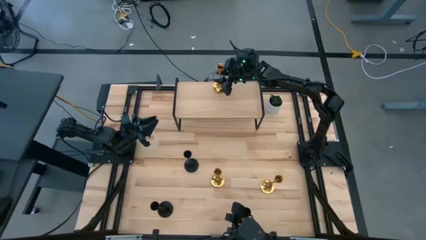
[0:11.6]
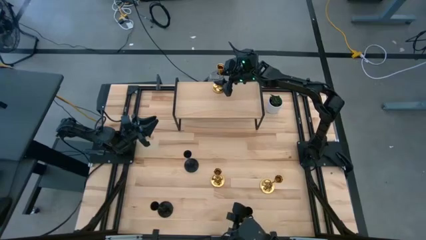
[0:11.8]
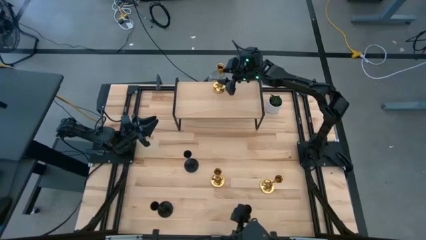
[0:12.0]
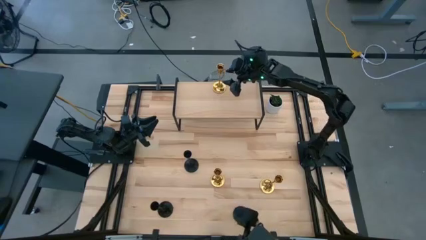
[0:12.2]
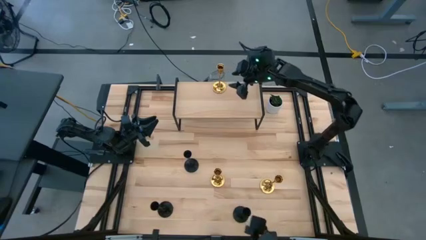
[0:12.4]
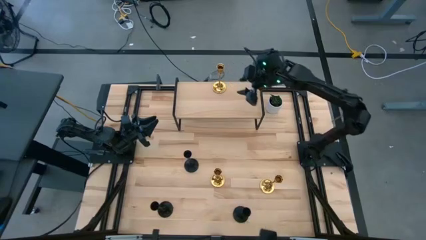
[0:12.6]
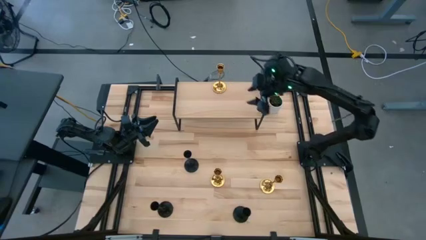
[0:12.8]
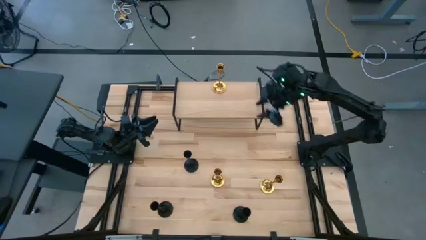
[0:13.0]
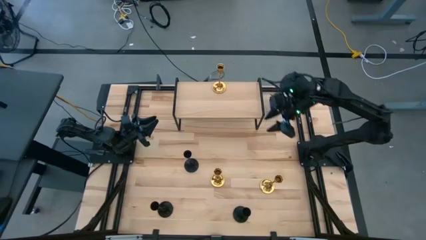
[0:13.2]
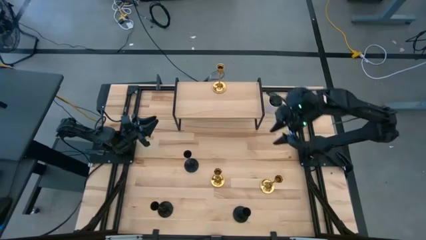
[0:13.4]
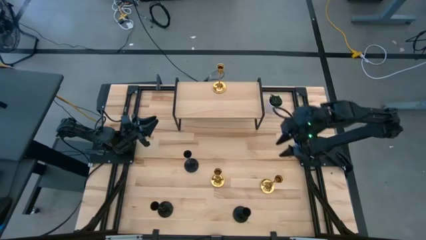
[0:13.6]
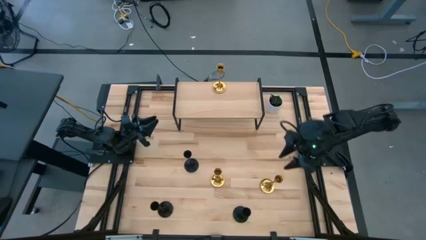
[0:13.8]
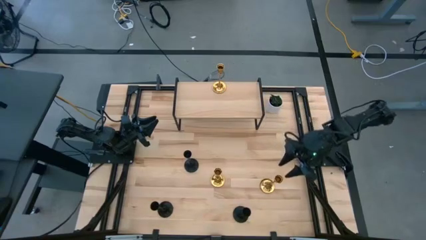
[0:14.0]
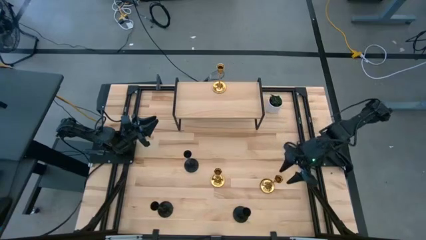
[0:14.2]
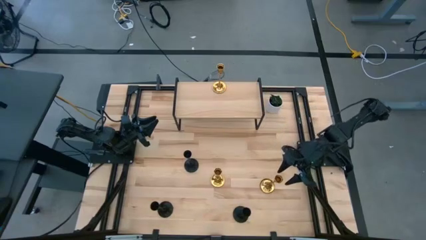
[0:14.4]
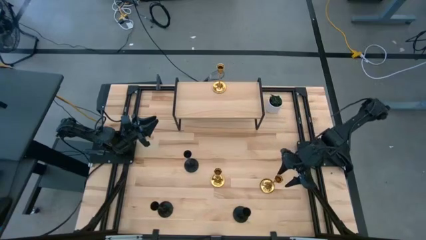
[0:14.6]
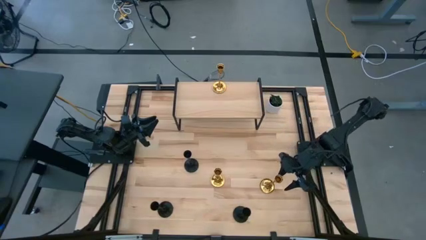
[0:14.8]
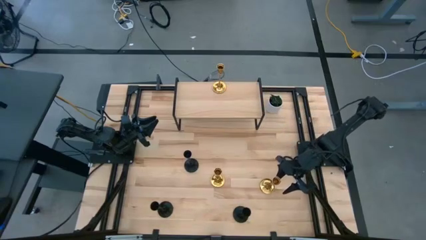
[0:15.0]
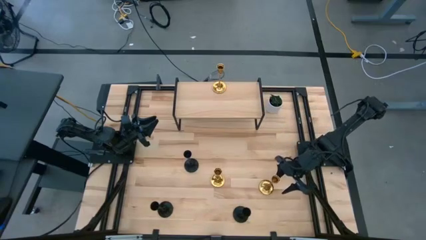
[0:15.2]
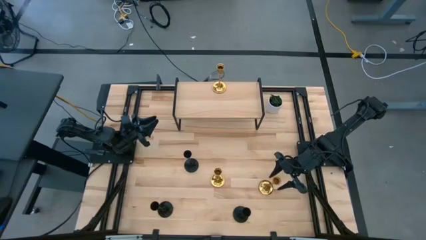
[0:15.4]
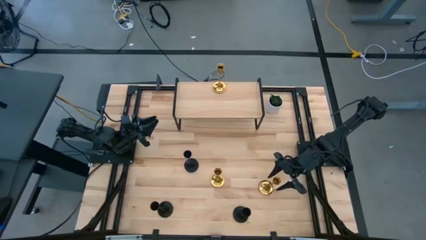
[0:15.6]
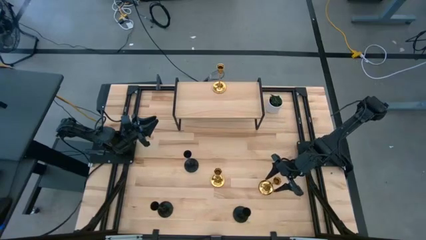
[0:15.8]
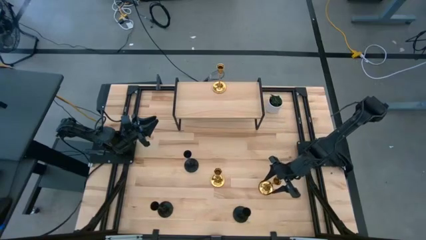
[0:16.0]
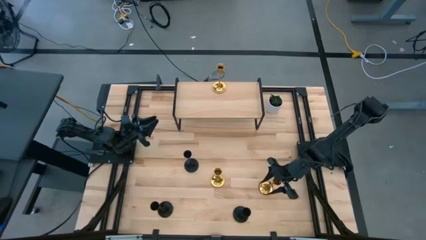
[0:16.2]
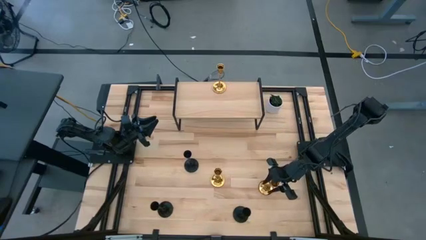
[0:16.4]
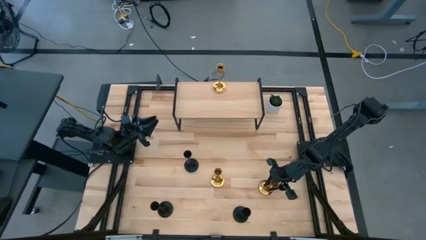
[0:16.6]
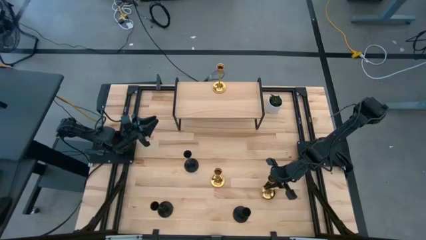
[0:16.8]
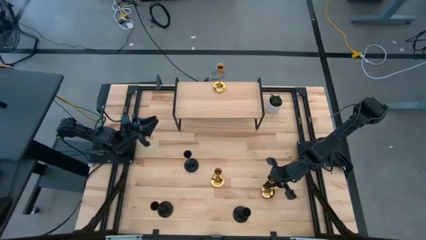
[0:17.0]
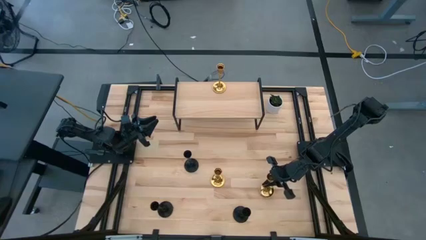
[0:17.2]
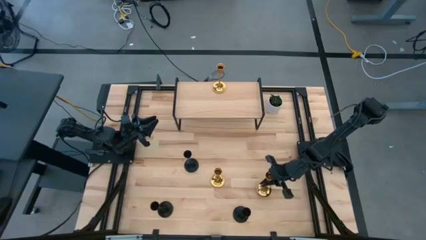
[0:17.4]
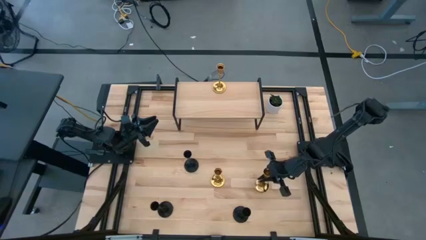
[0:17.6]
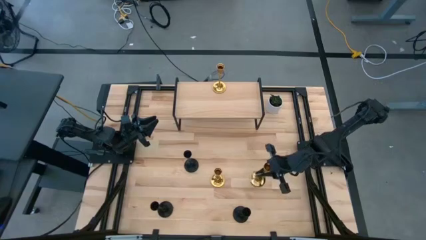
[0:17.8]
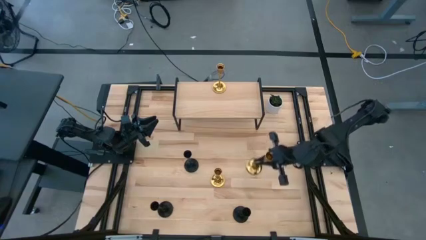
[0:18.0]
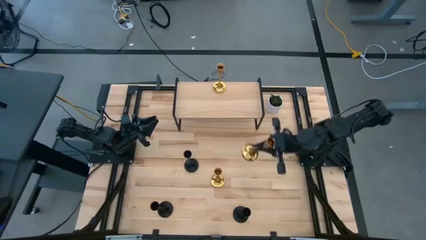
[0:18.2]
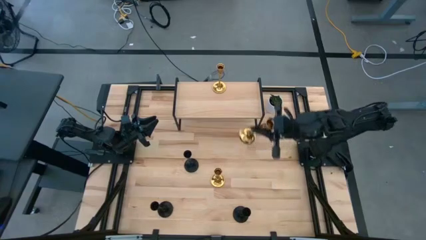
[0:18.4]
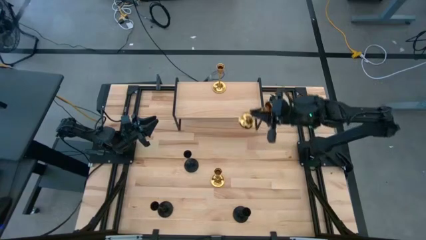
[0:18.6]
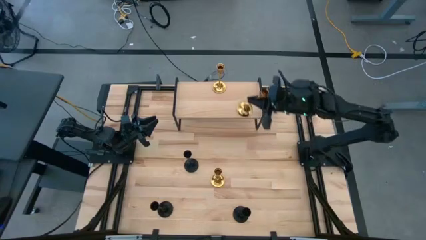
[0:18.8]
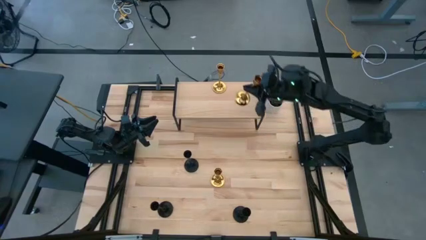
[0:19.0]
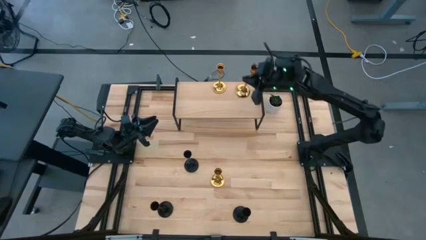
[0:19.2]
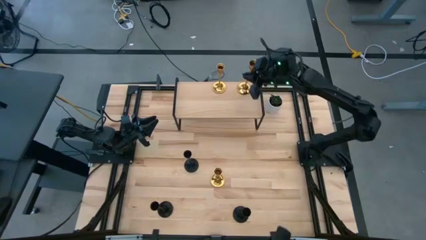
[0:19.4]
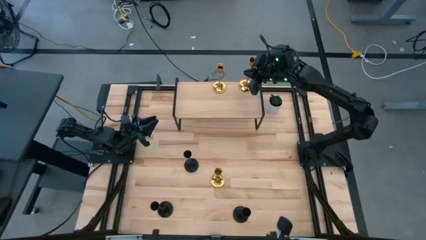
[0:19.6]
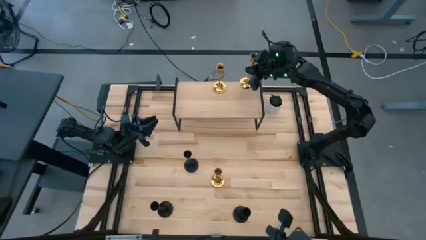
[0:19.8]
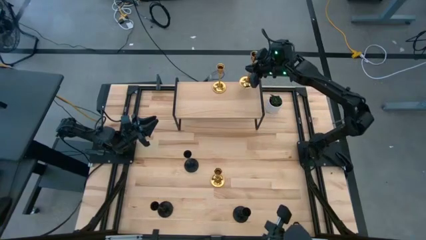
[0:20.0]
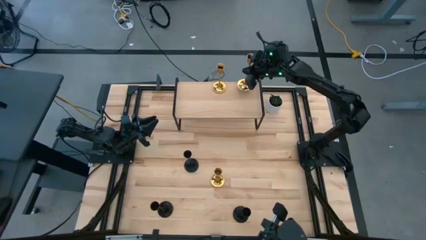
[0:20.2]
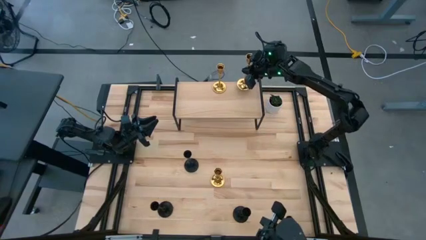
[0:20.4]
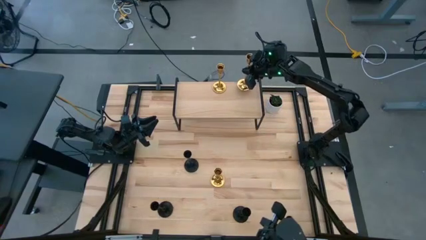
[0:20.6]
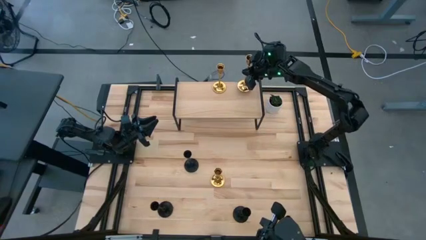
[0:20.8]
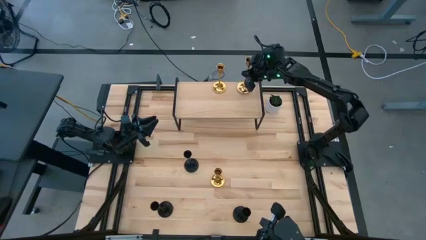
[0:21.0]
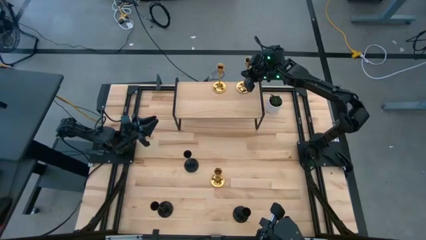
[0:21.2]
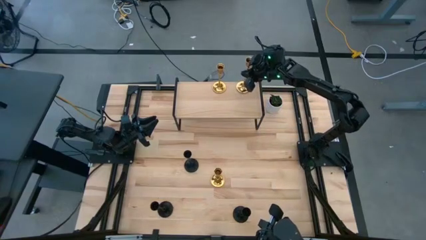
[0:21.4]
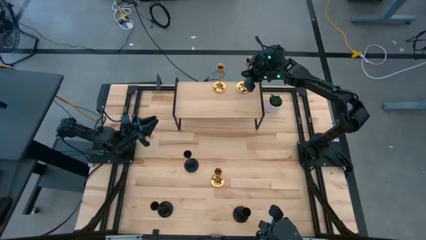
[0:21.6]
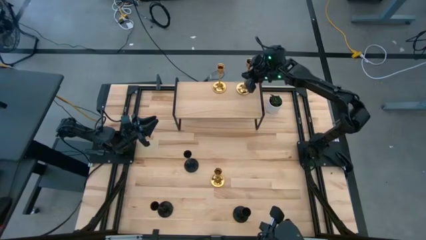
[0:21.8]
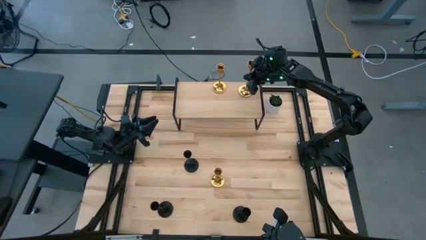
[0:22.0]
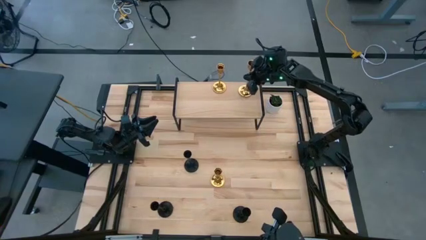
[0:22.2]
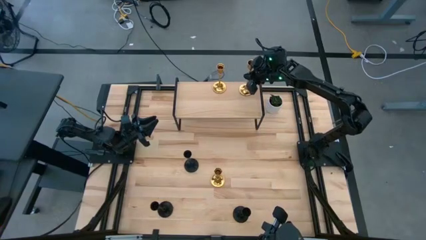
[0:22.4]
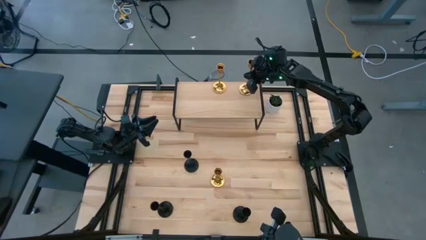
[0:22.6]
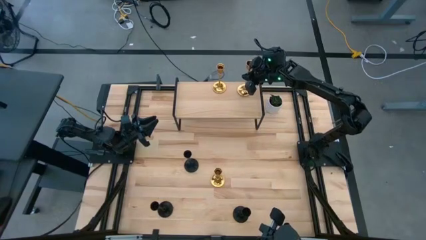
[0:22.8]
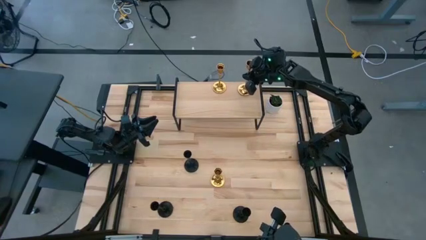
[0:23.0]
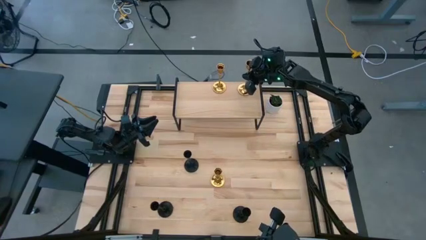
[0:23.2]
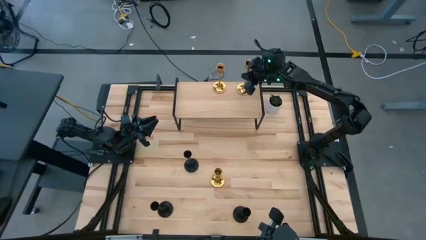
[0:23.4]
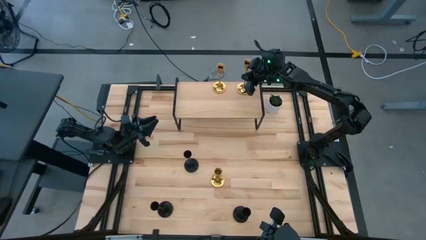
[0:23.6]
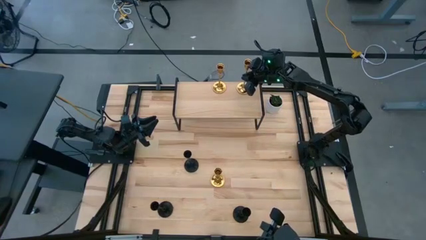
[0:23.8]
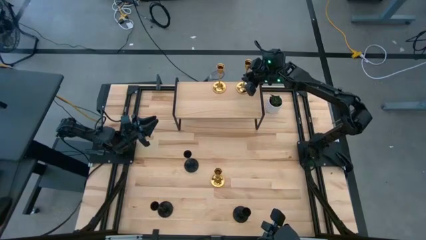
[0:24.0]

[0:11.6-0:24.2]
Task: Pick & Place candle stick holders
Put the right gold candle holder on the shelf
